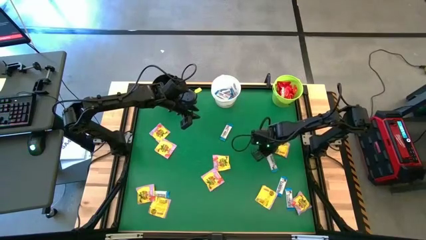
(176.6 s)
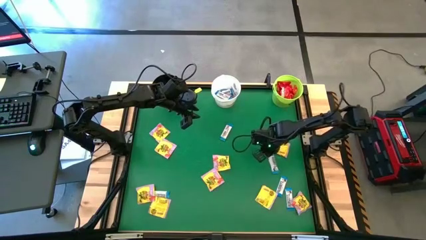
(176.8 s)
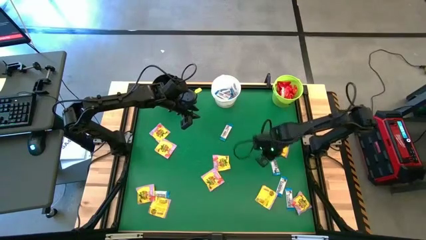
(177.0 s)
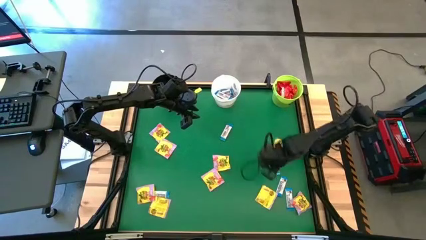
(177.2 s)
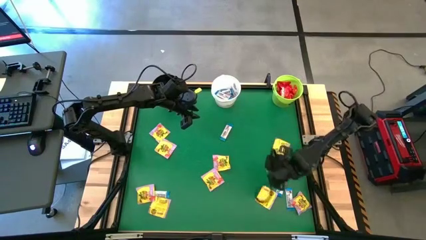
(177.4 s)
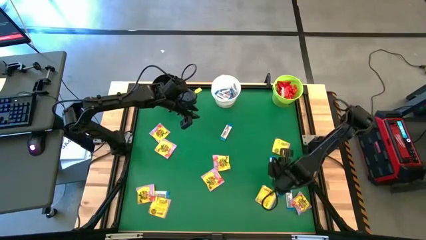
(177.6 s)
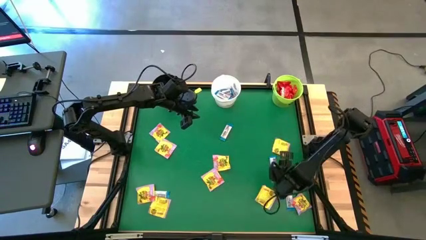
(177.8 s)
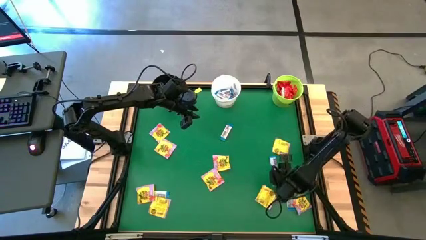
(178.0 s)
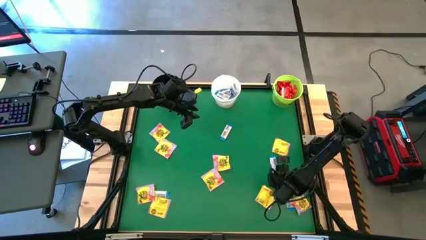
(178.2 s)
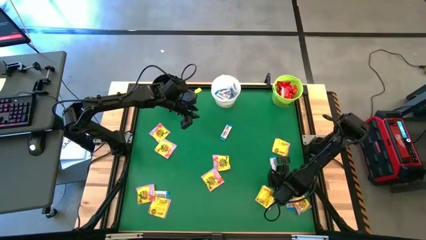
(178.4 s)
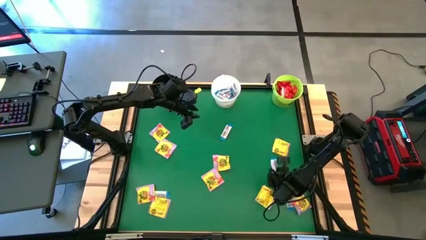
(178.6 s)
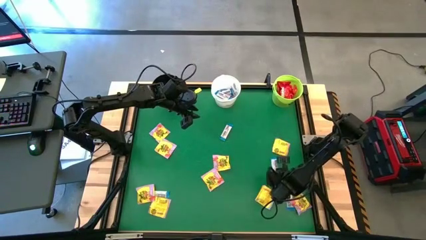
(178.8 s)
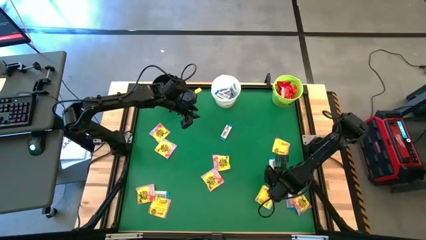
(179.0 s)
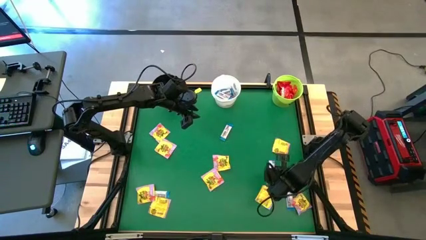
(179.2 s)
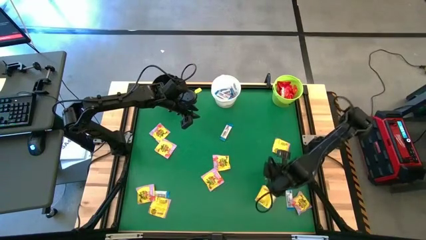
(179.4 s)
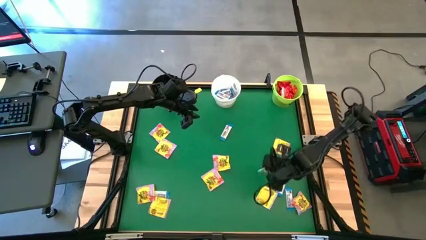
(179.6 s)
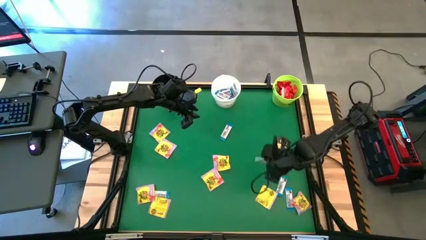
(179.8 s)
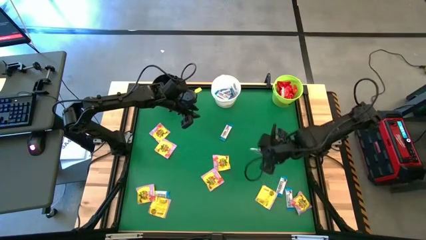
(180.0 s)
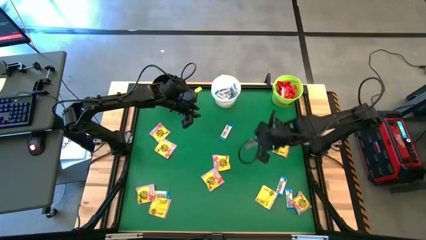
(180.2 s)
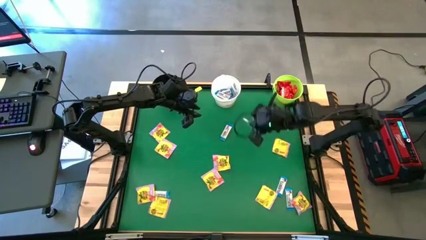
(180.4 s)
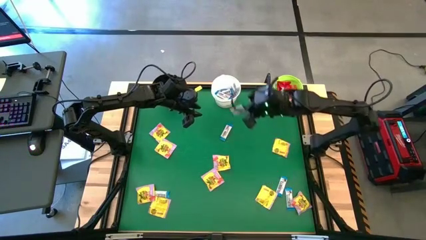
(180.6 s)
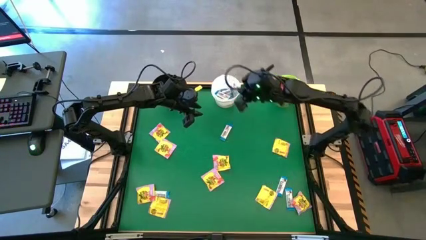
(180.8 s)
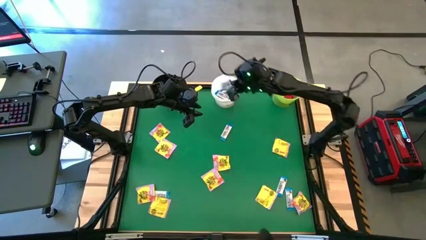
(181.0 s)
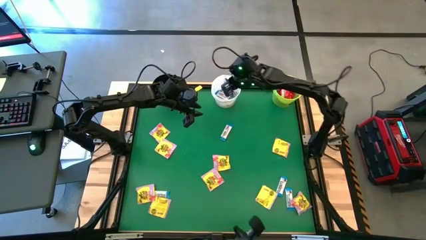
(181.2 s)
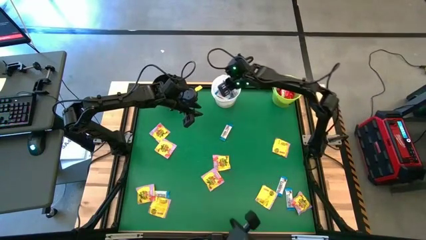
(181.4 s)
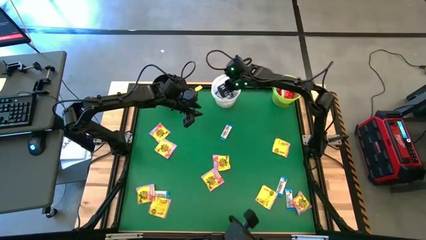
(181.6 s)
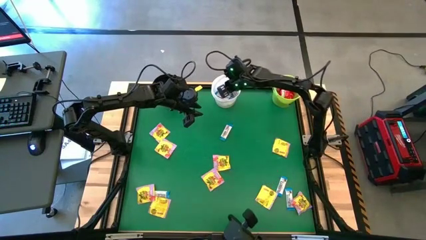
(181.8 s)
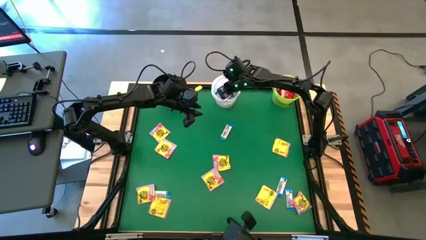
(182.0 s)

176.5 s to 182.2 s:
Task: Sort candy by brand, put in halloween buckets
Put the white candy into the white bucket

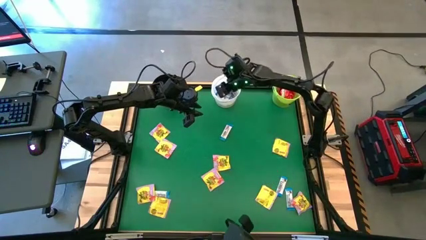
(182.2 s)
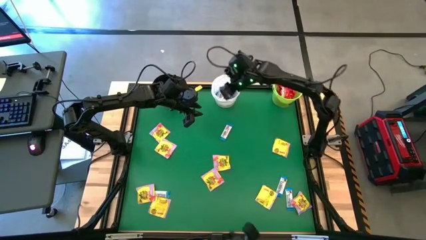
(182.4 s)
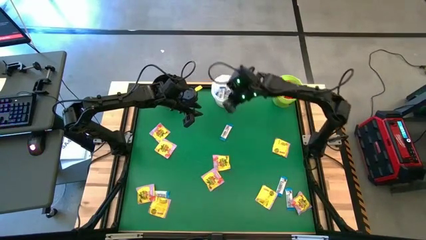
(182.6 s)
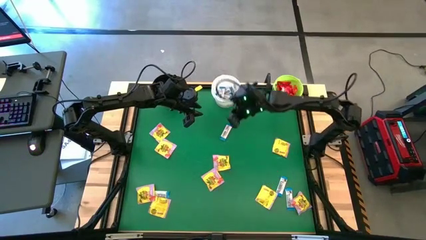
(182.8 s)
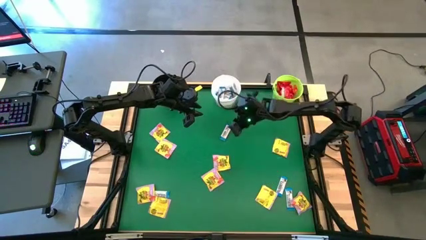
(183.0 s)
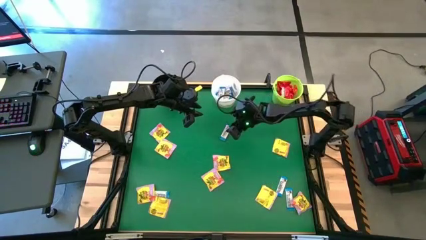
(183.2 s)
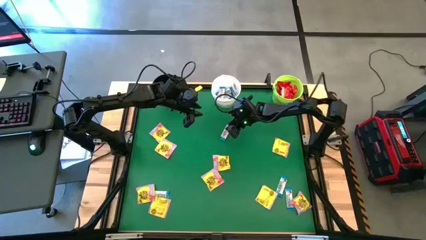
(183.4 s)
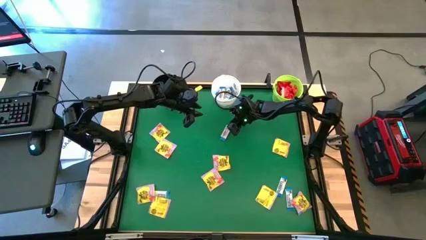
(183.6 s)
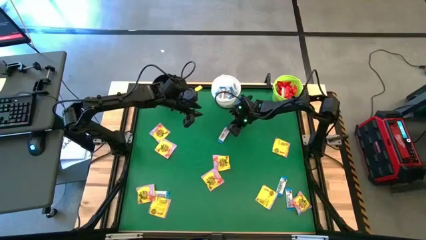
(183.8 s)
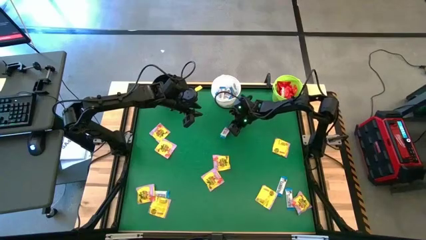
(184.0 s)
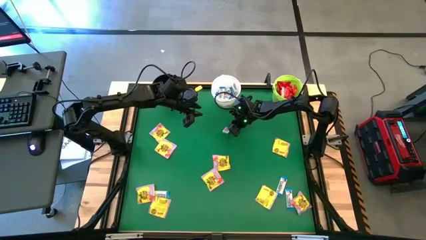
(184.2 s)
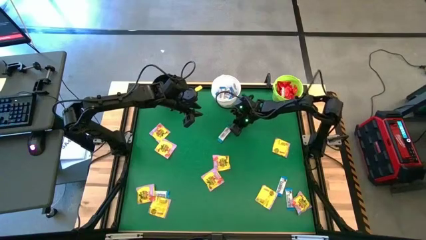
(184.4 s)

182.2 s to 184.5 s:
Put the white candy into the white bucket

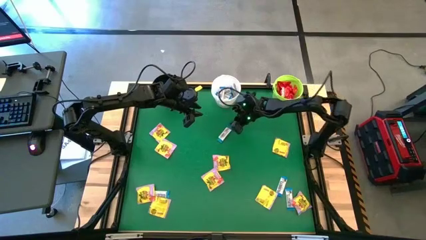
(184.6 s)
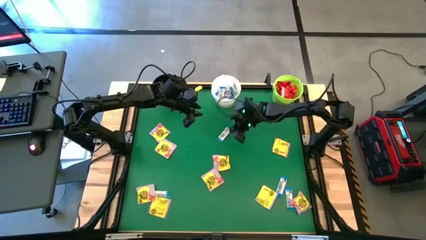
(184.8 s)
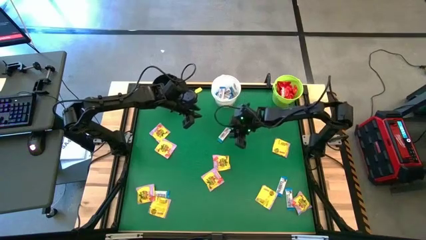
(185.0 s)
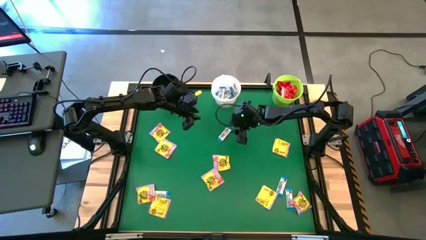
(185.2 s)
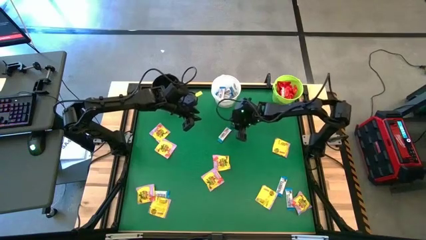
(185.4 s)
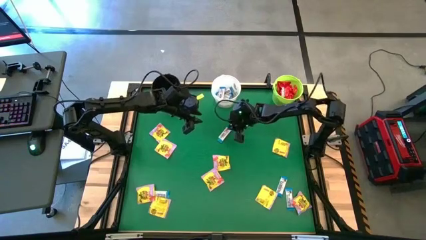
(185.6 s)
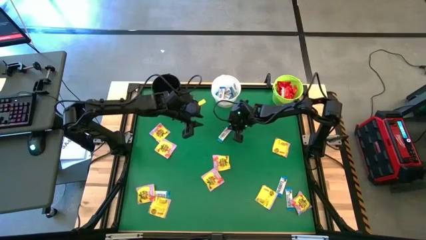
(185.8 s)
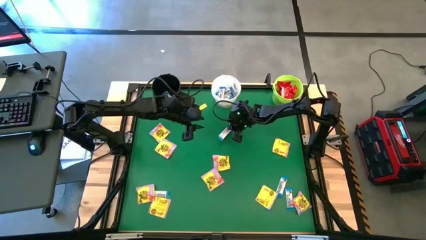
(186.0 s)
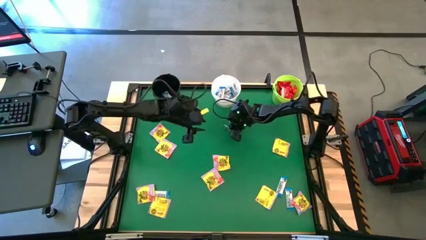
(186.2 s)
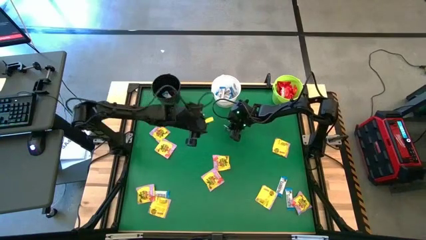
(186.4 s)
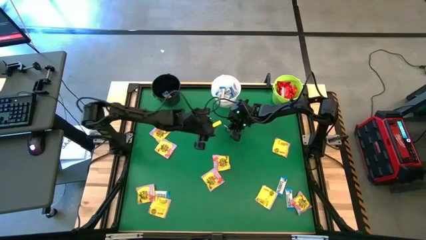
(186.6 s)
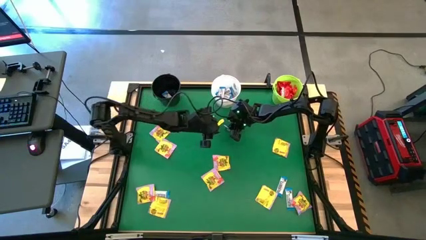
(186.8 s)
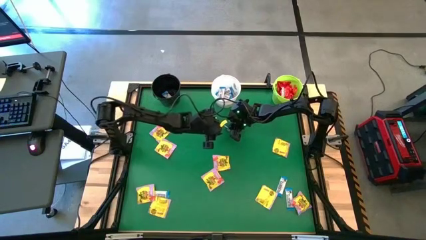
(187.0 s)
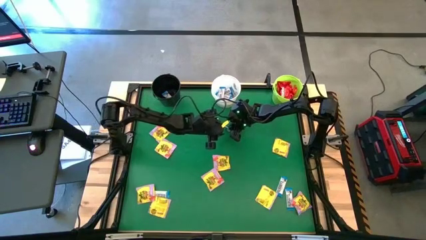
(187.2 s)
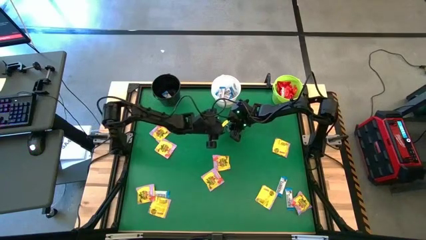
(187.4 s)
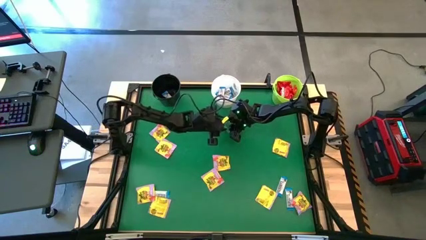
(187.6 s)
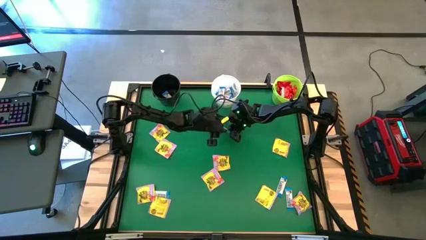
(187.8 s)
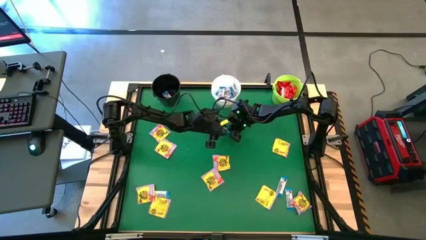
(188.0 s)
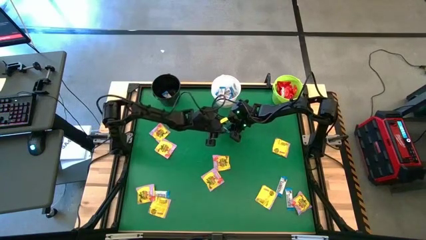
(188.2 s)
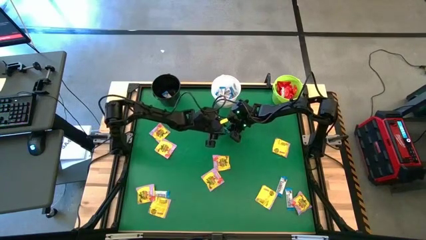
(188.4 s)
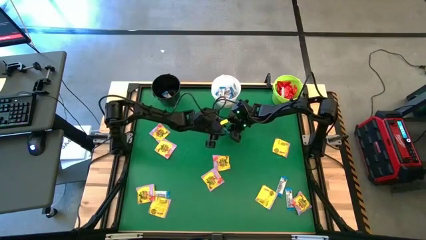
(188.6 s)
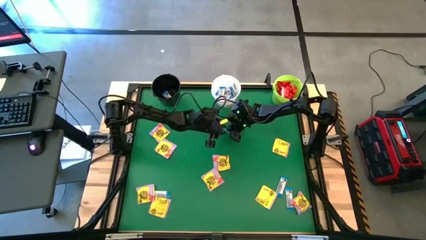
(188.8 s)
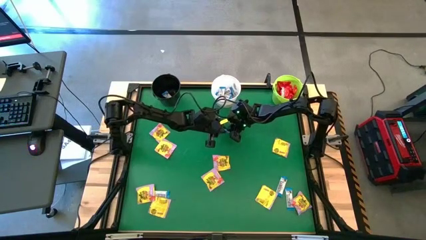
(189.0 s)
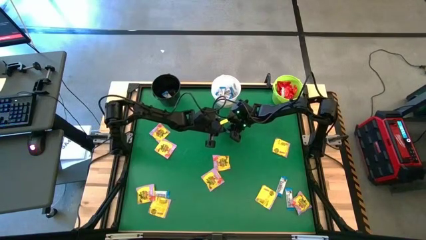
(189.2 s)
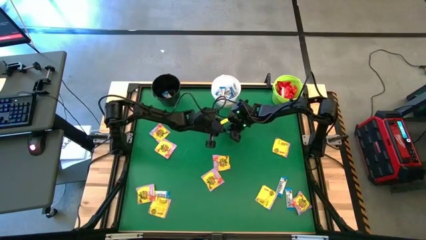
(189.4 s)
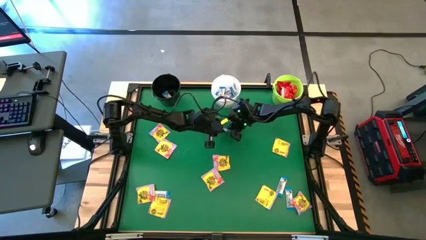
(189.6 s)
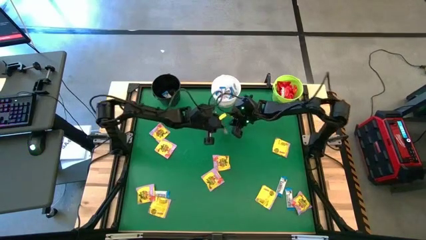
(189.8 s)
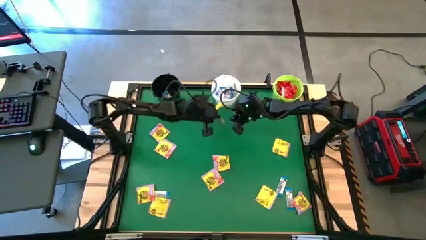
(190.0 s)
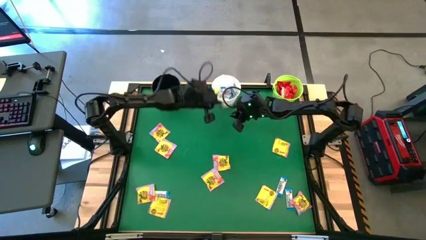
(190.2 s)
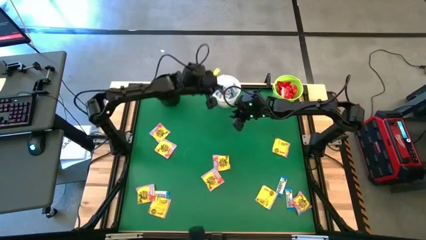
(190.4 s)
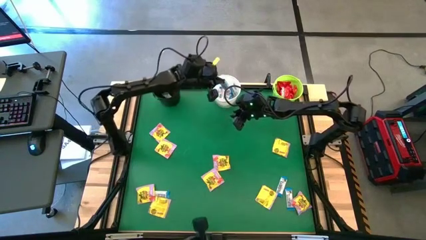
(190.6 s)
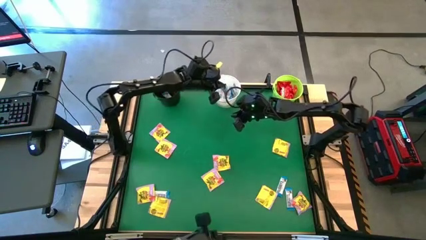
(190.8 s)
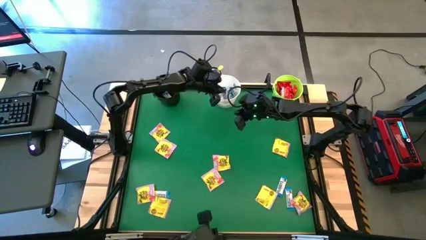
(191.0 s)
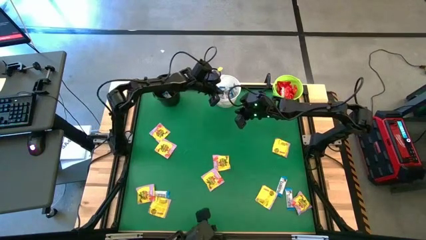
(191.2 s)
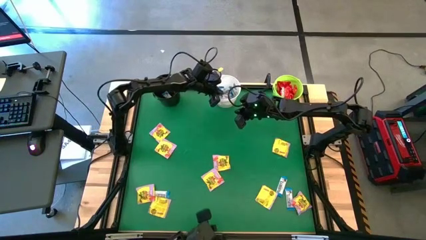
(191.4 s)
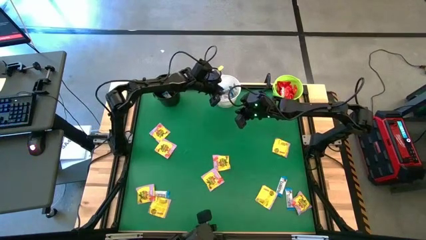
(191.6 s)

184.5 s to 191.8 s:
Put the white candy into the white bucket

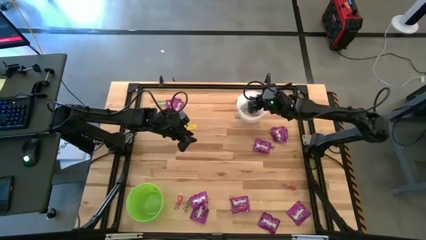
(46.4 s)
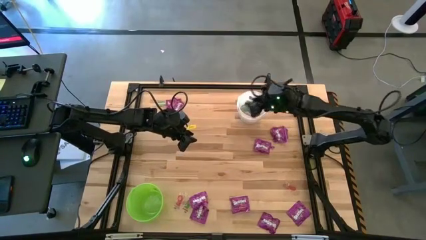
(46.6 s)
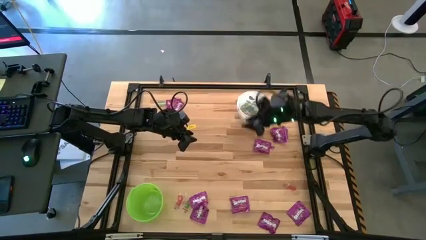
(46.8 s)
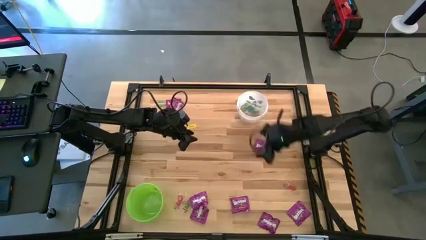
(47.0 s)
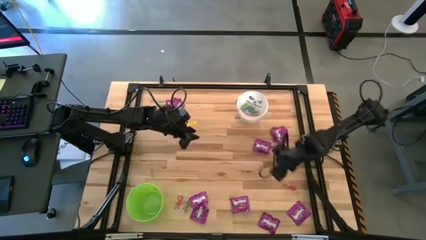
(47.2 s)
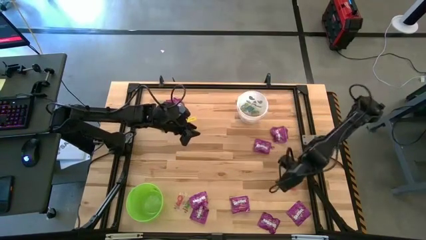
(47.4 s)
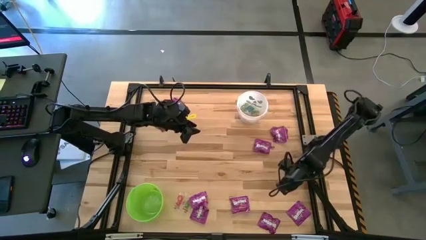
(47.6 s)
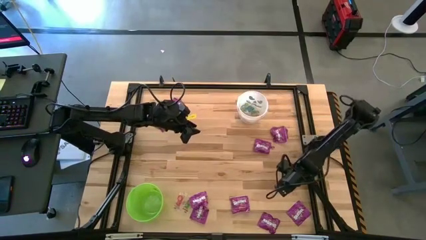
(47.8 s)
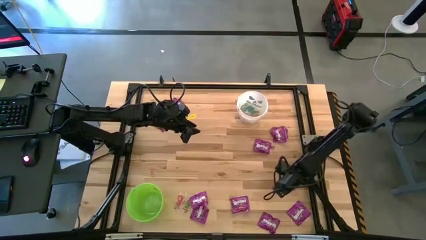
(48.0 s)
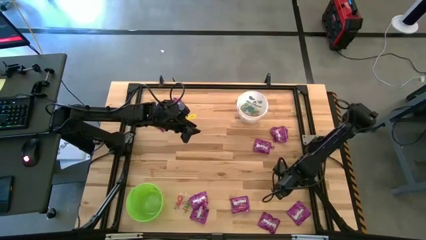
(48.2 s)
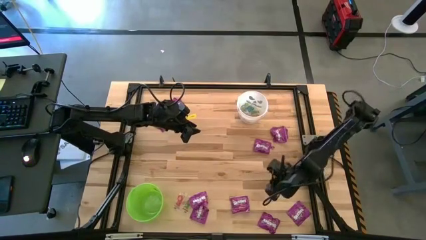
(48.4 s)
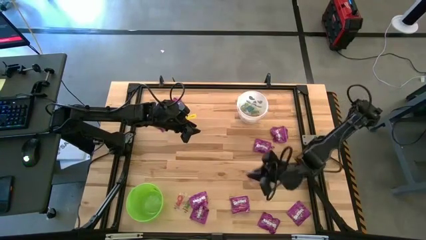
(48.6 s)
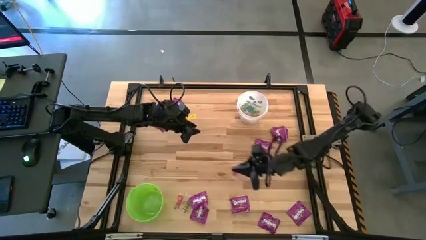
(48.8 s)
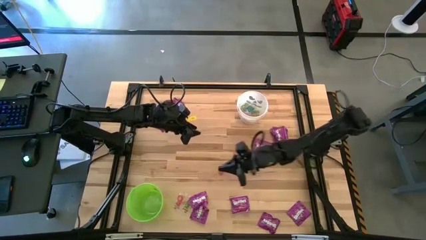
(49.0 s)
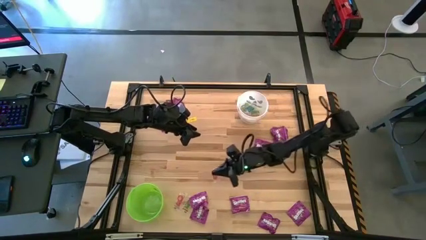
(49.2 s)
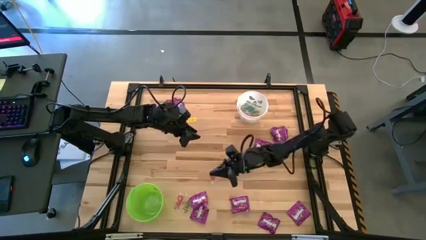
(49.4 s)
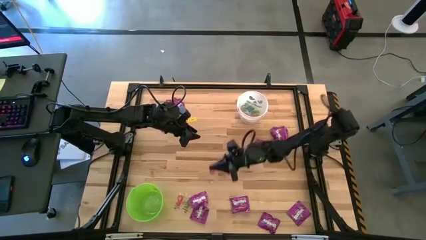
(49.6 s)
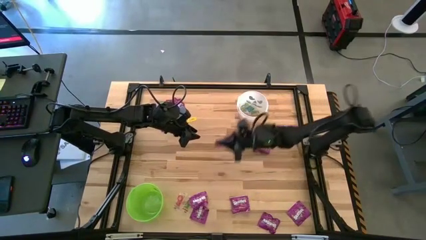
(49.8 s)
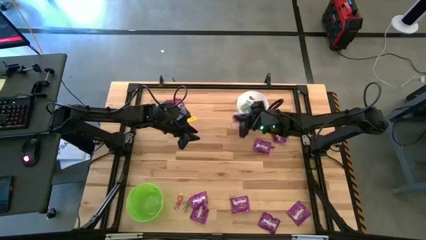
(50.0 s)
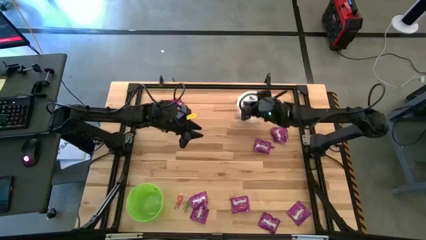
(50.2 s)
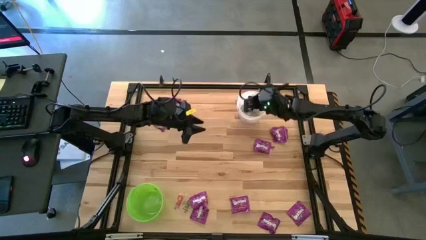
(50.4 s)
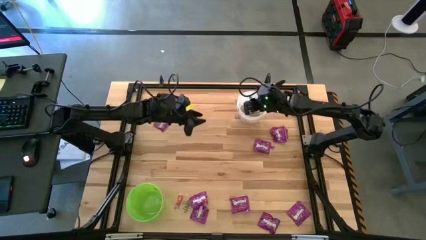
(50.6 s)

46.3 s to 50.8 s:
Task: Sort candy by brand, put in halloween buckets
Put the red gummy into the white bucket
